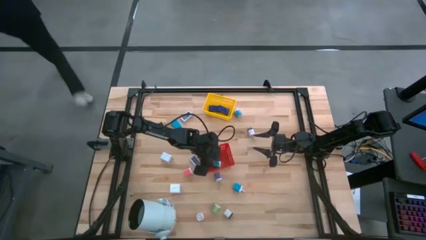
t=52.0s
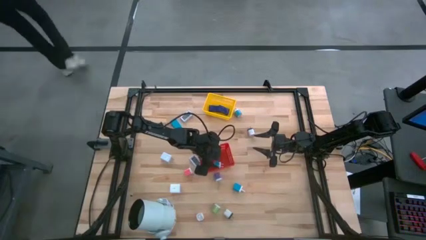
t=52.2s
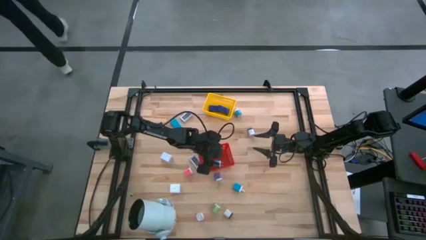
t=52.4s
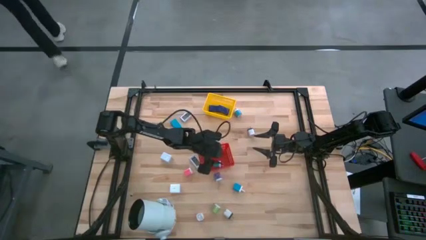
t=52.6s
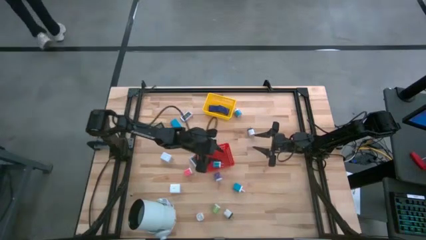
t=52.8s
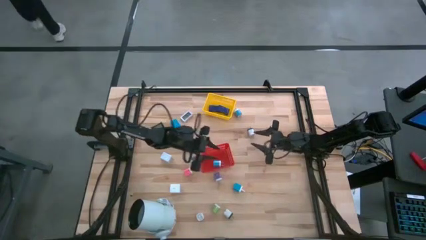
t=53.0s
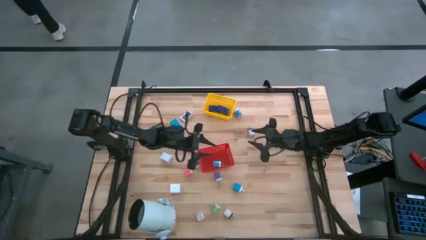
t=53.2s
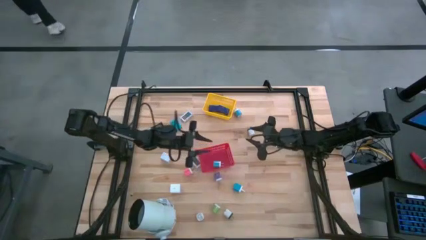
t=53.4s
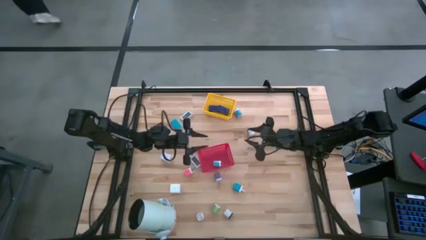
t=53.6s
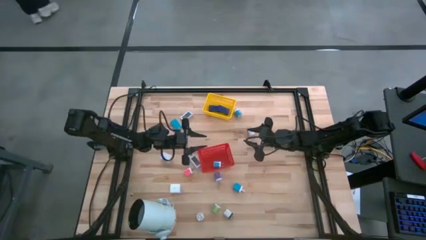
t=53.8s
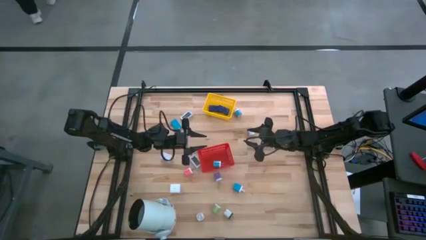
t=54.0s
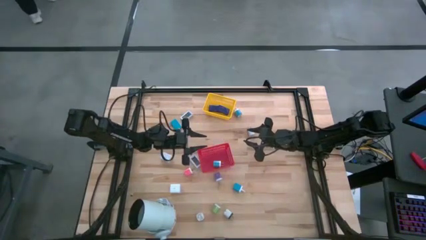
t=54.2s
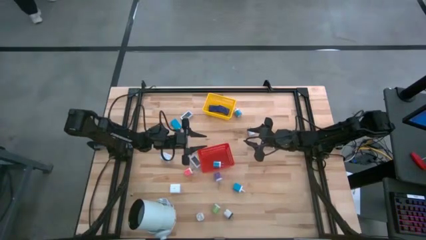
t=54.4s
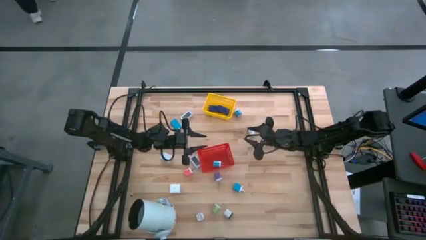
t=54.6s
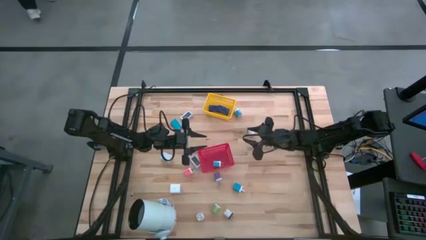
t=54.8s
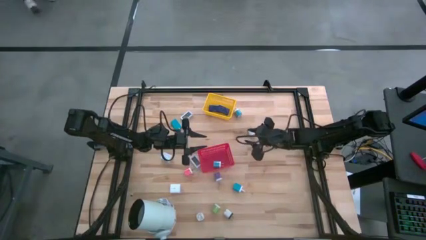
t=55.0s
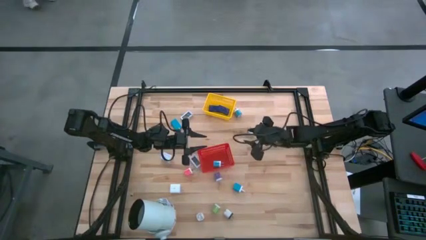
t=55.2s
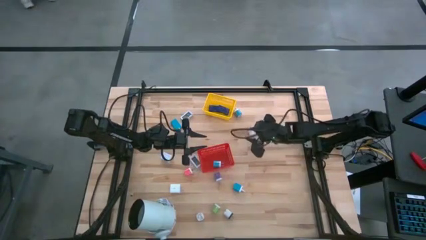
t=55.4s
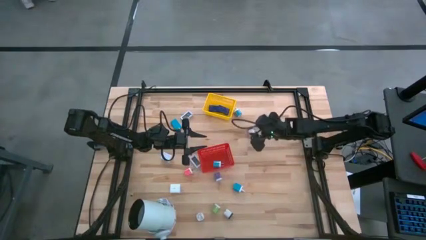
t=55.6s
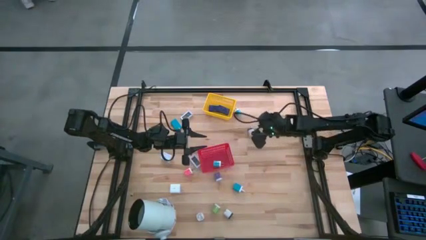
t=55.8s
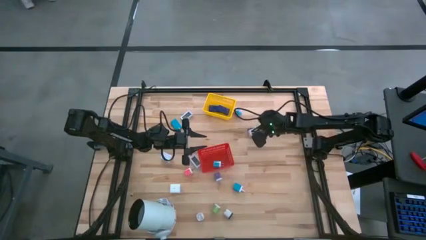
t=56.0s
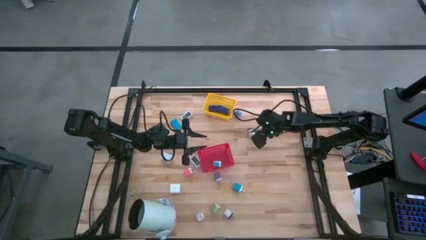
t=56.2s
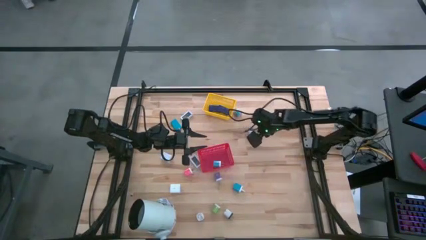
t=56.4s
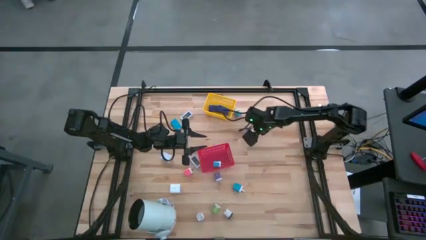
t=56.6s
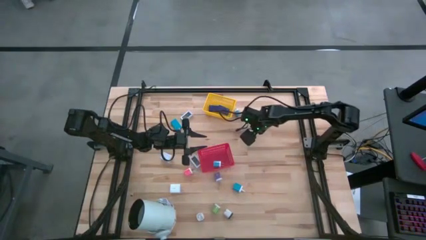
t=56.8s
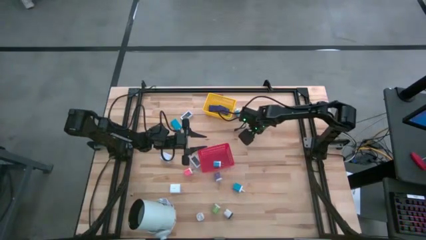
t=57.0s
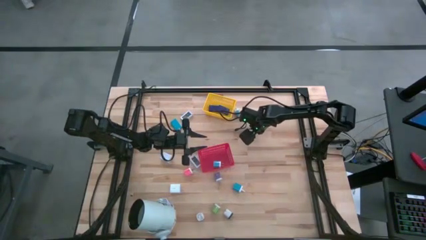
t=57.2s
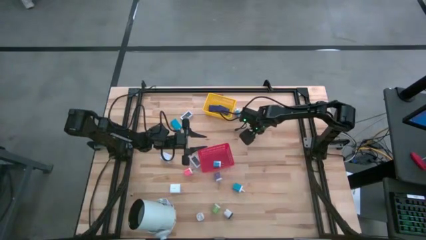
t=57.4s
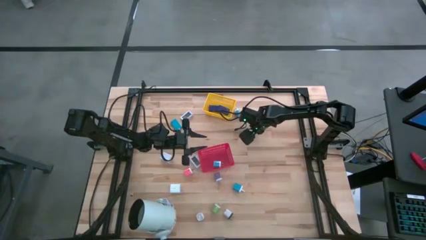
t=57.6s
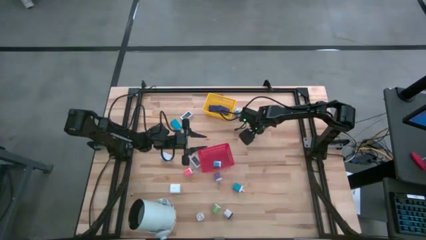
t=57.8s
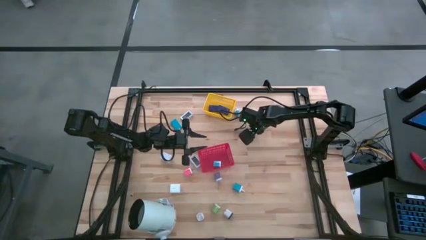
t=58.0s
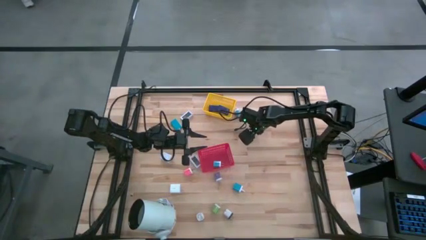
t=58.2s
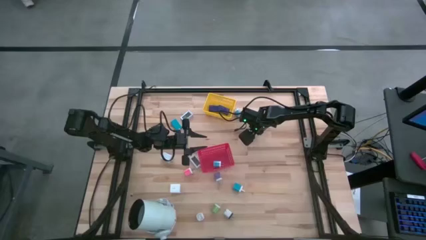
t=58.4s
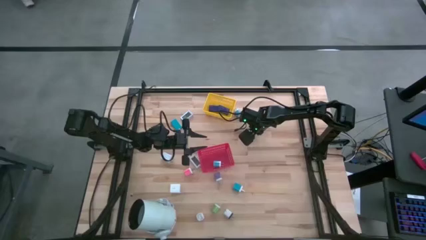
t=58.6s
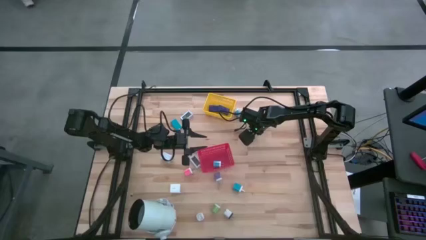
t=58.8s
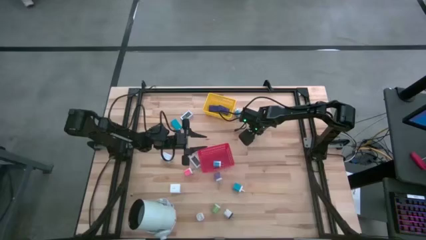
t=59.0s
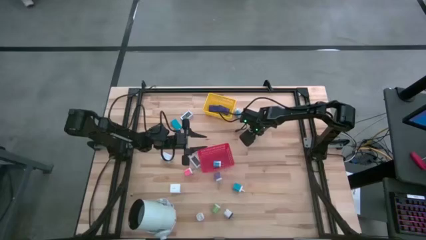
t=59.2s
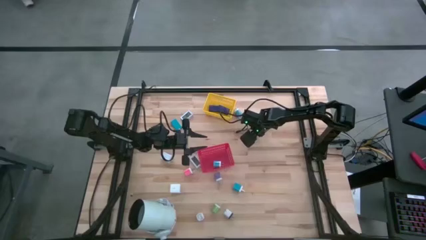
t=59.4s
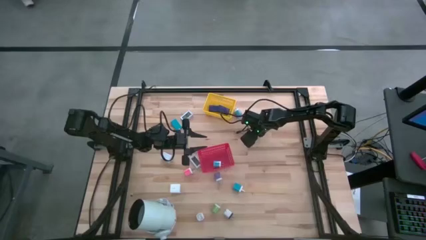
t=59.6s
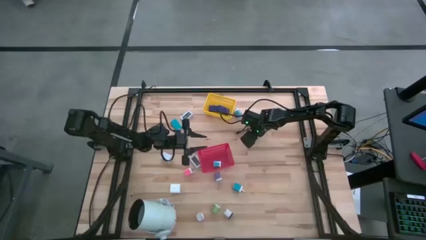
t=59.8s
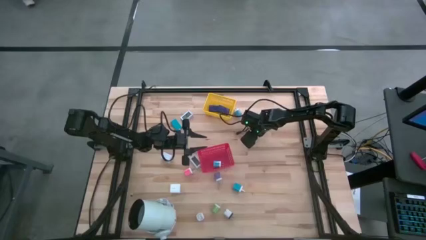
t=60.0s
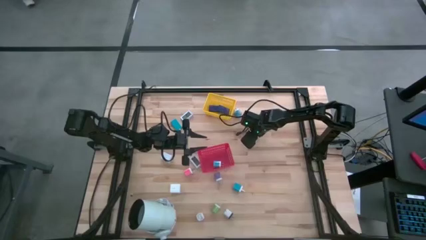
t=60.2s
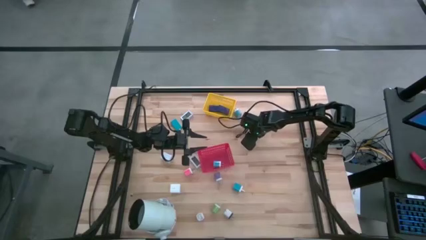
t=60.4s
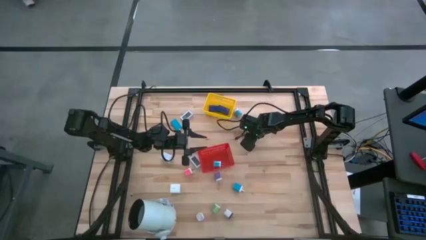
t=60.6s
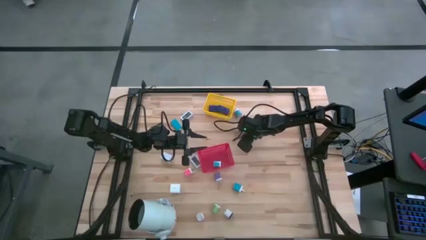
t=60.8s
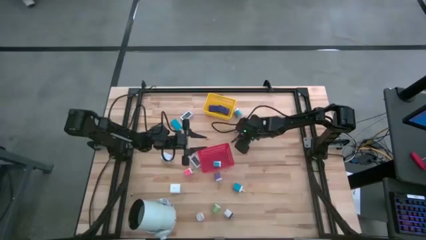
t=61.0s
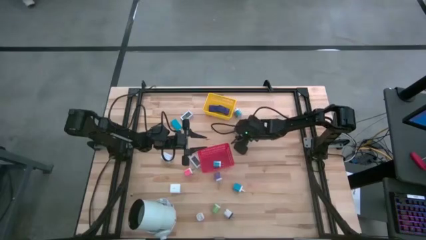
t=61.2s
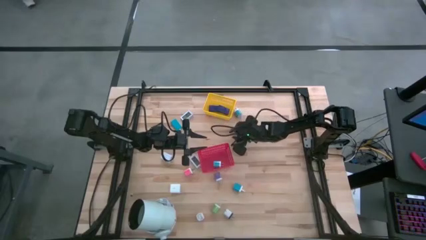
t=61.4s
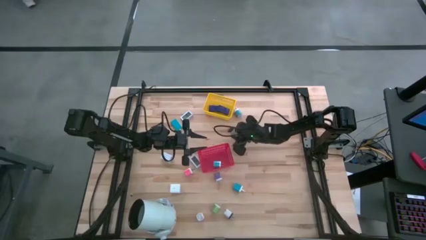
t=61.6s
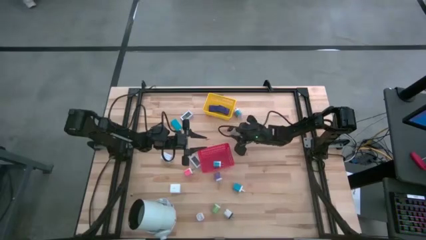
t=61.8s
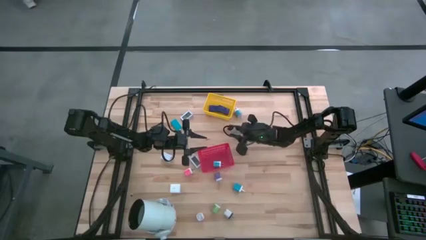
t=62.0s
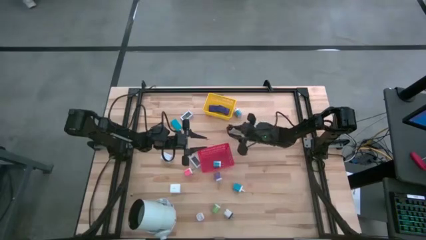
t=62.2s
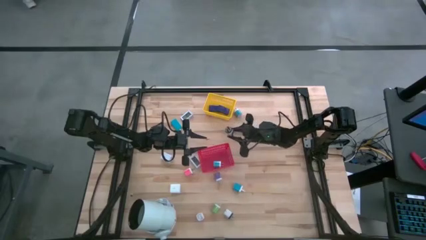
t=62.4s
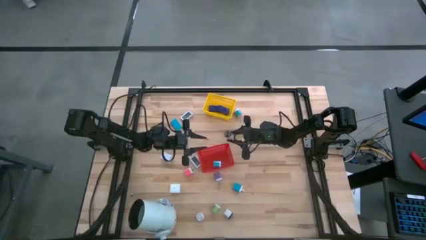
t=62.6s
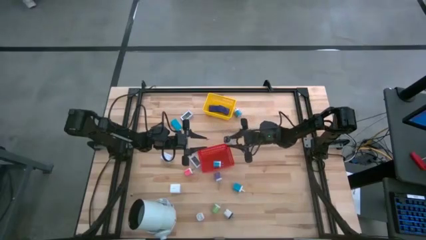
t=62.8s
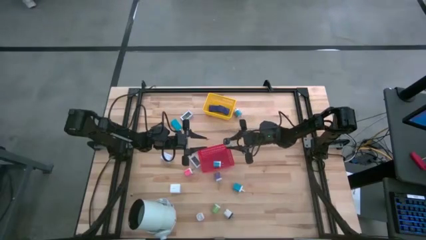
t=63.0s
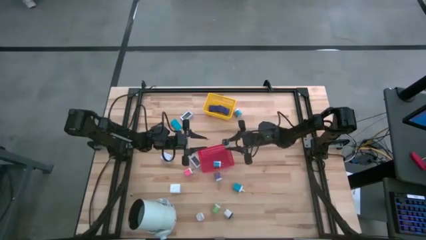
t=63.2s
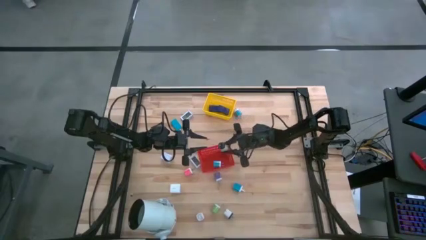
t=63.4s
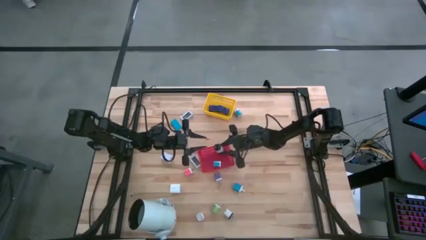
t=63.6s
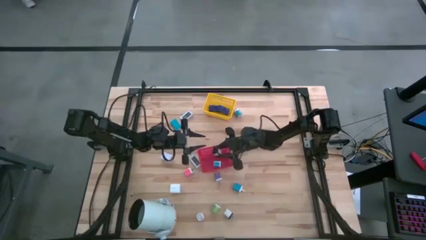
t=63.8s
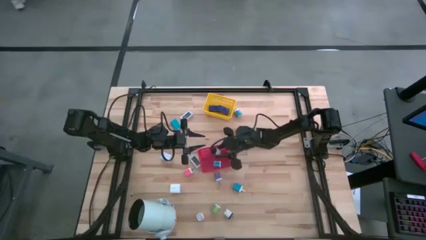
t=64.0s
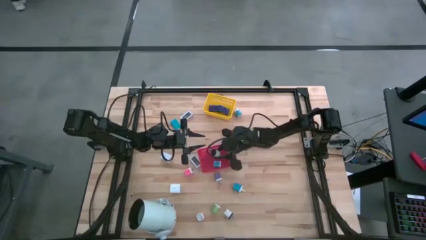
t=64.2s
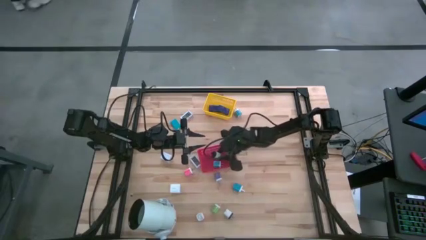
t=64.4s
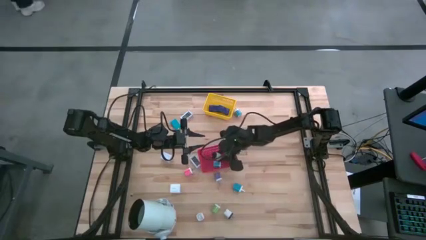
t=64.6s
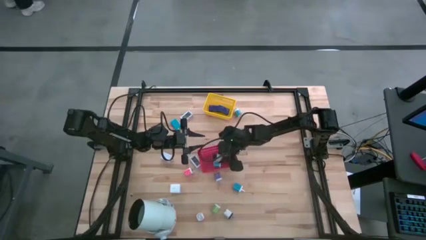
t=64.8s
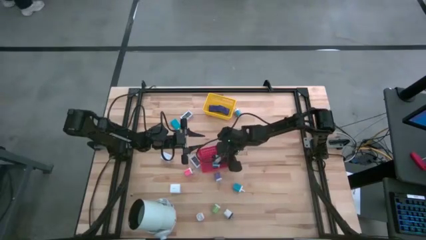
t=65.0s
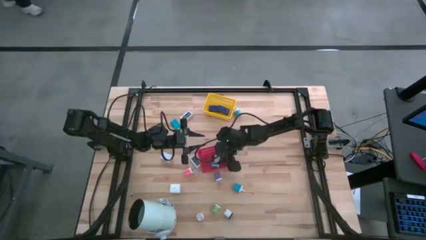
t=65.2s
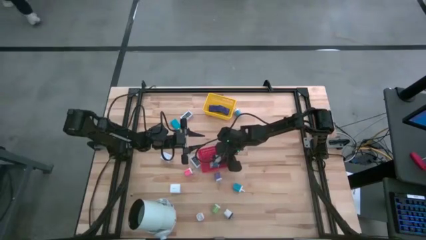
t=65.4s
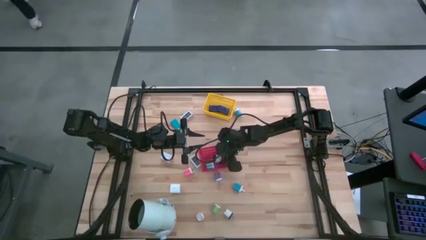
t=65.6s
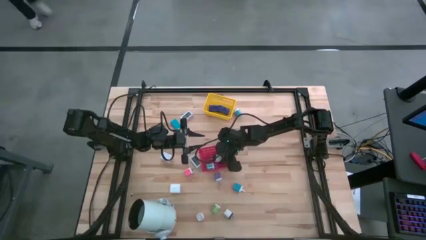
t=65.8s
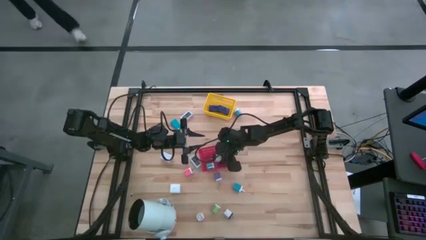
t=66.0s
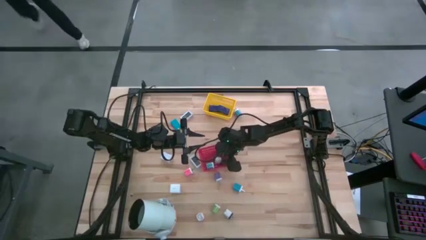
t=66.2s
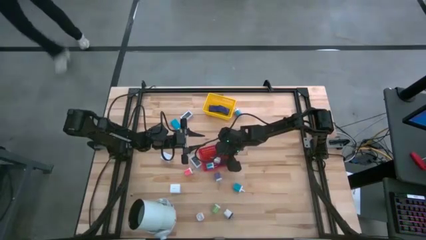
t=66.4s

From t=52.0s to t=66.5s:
Task: Pick & Place Office items
Put the top white and black charger adapter into the red bin

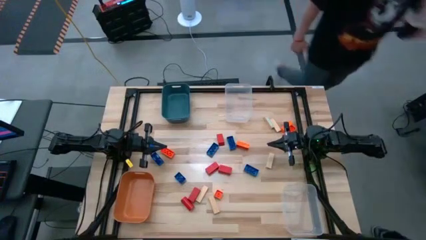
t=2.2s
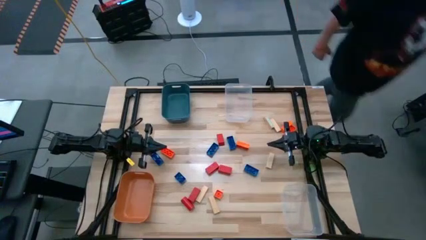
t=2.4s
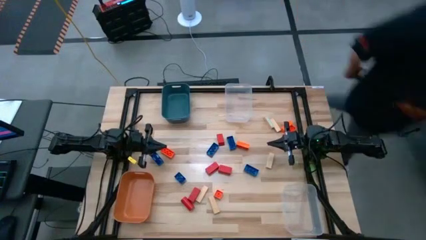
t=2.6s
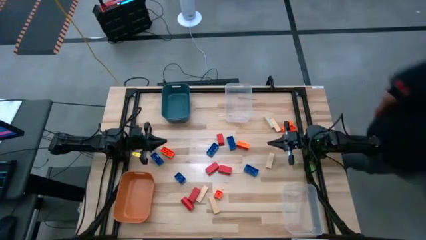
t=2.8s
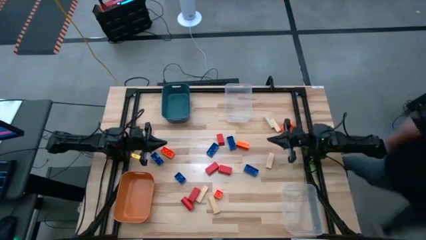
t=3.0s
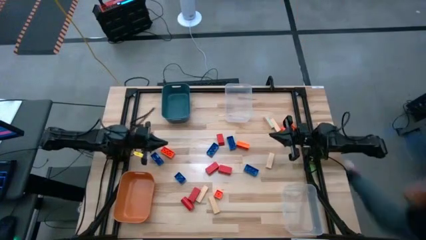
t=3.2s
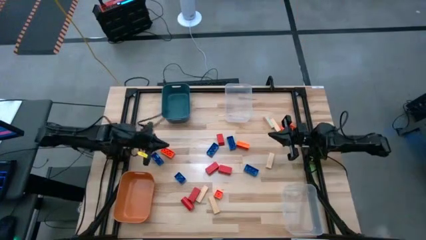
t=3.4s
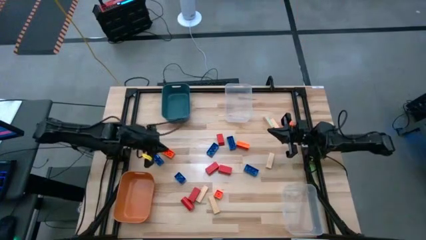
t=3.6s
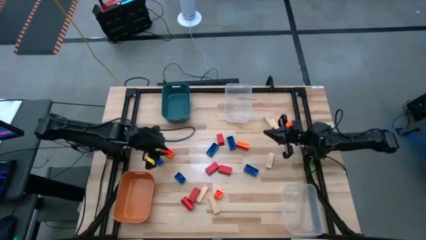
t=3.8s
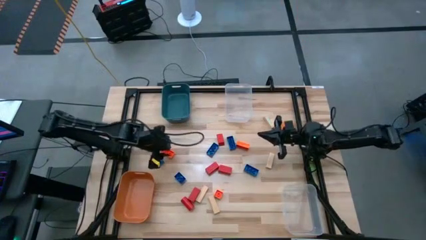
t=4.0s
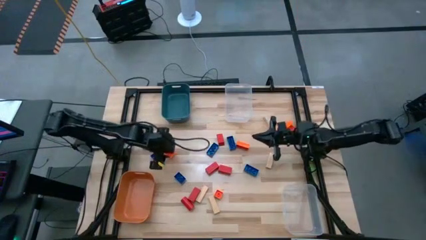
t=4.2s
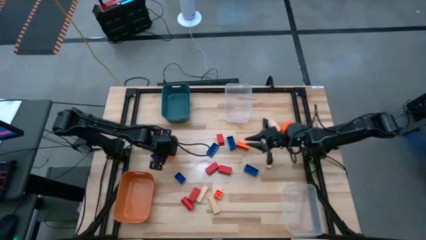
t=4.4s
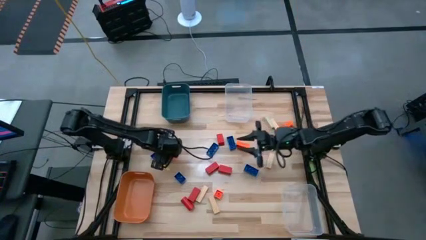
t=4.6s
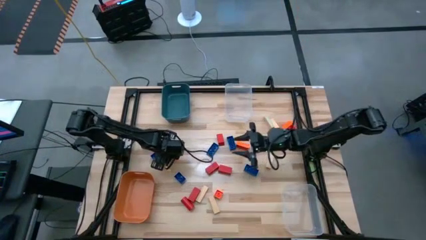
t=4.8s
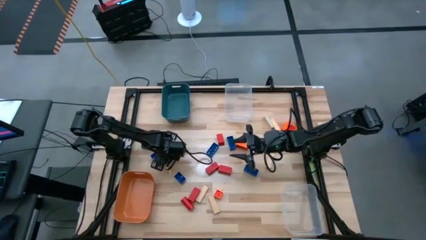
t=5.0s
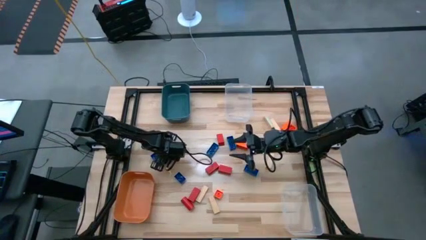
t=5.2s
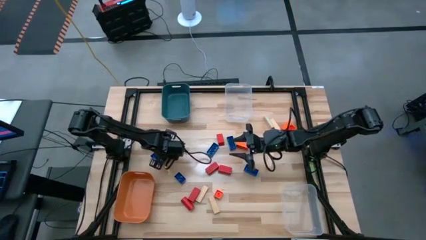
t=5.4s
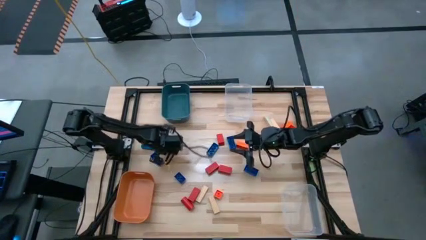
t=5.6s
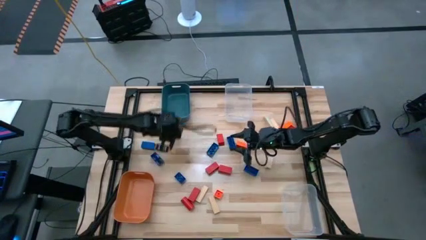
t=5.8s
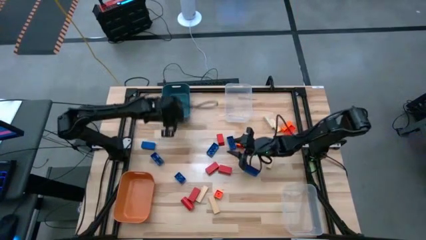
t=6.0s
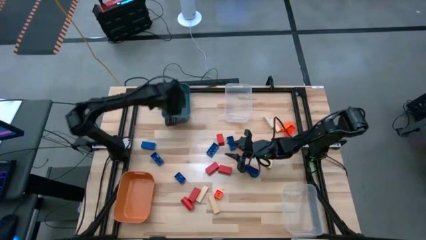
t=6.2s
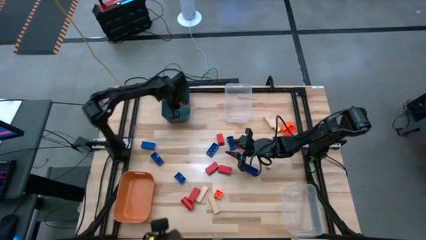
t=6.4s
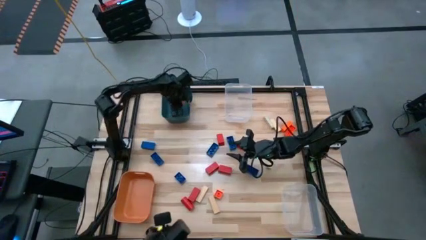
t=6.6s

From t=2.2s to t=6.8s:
Task: Sort blocks
Put the orange game piece into the blue bin
